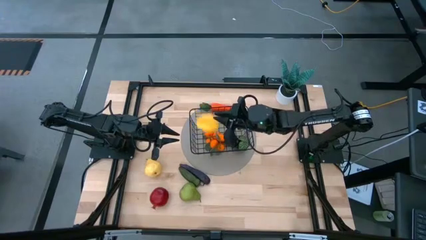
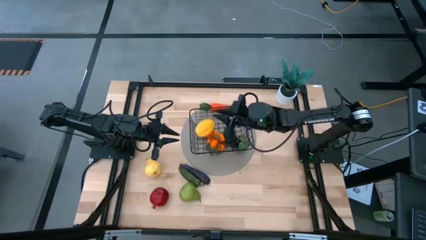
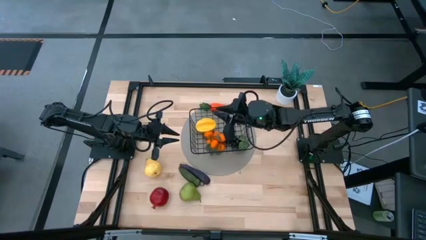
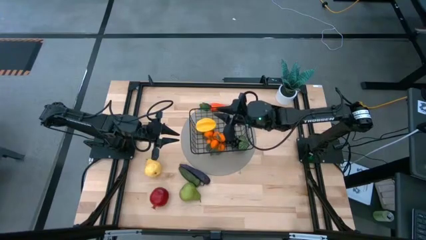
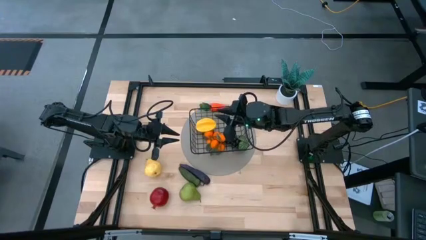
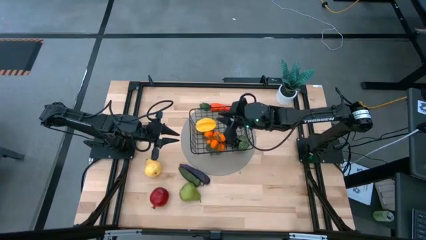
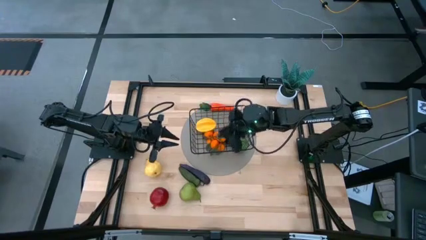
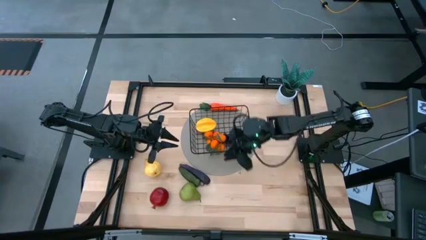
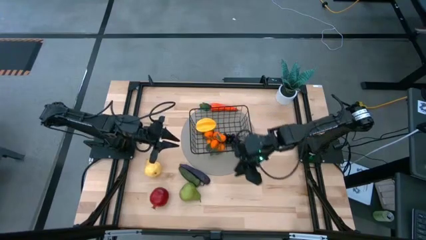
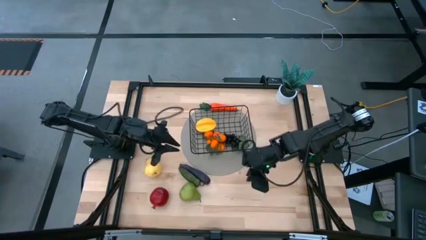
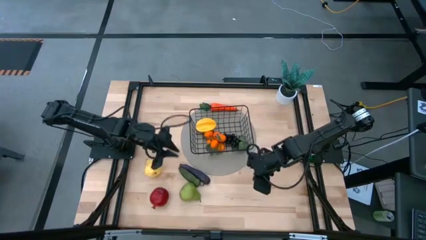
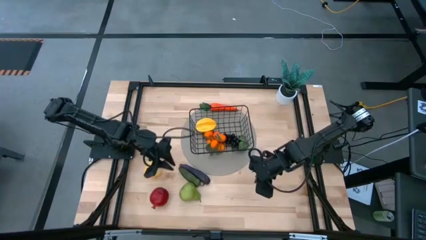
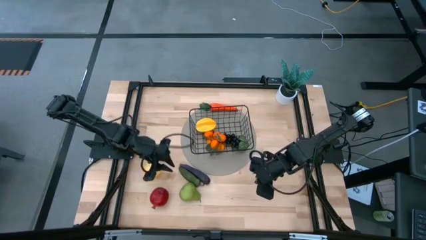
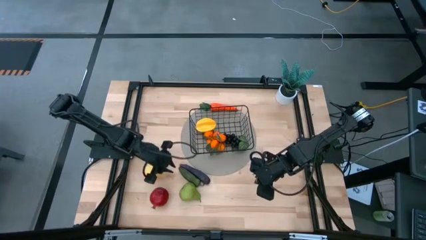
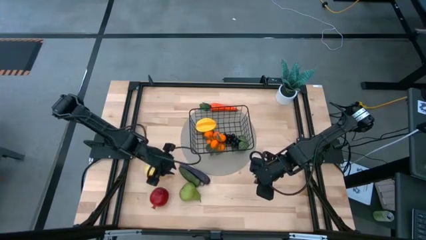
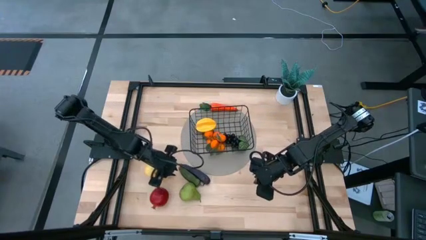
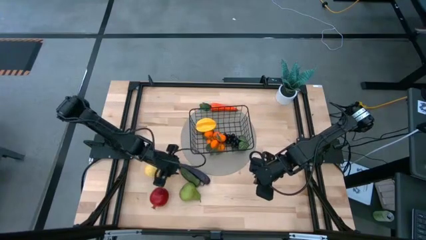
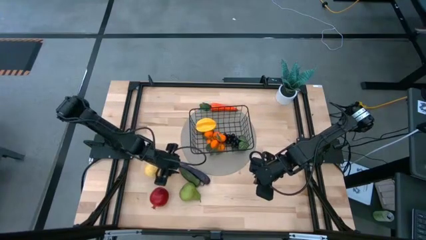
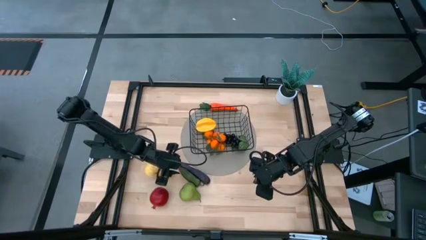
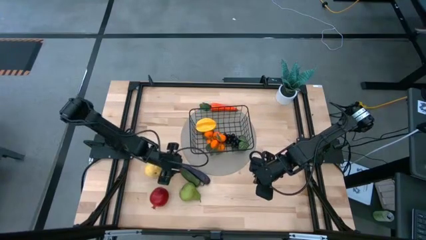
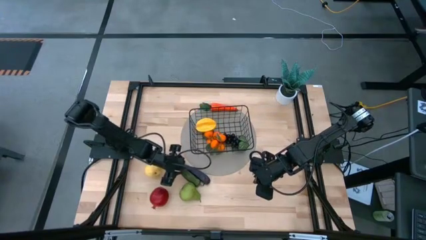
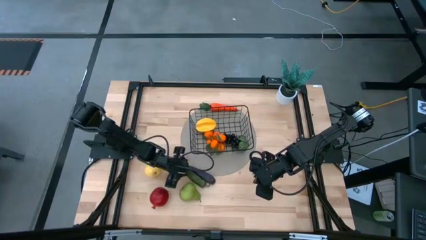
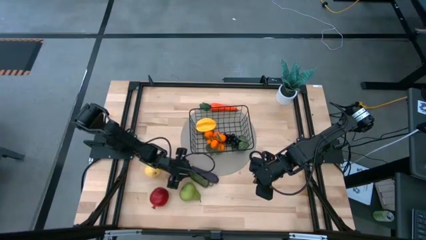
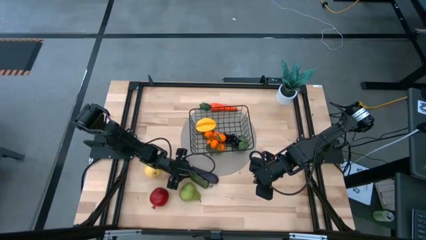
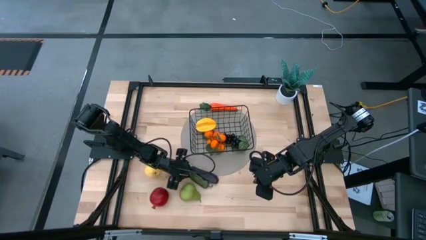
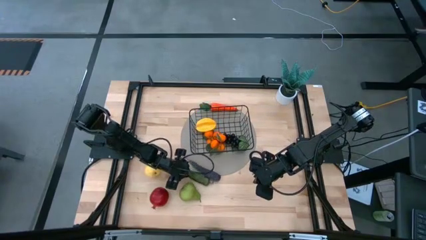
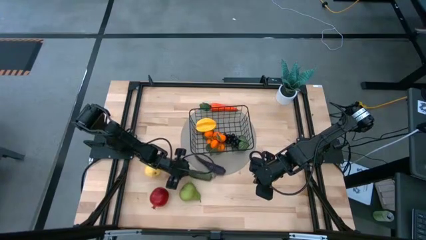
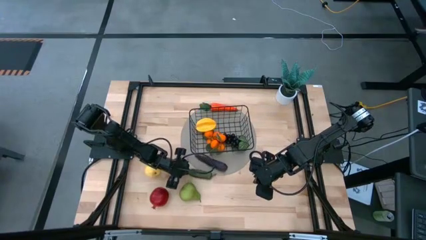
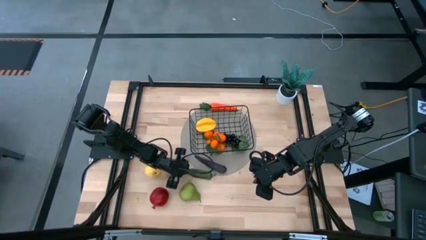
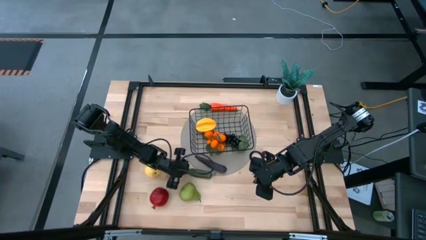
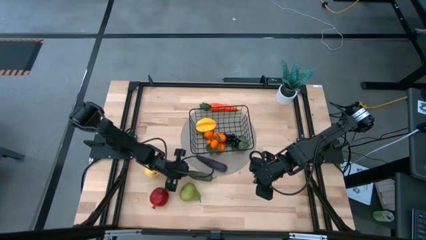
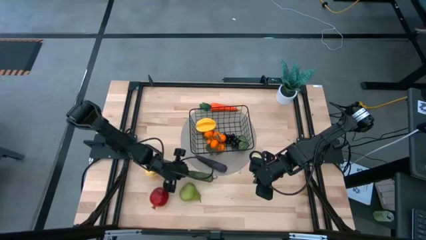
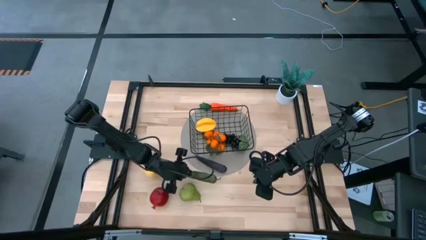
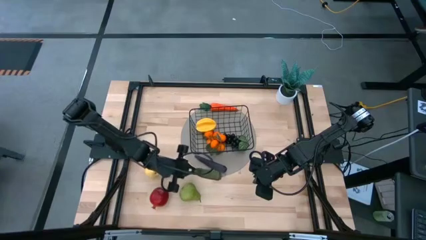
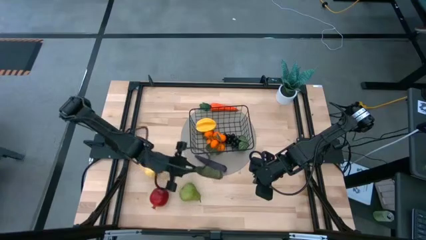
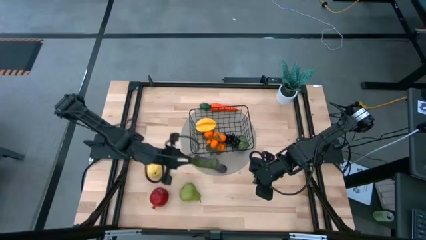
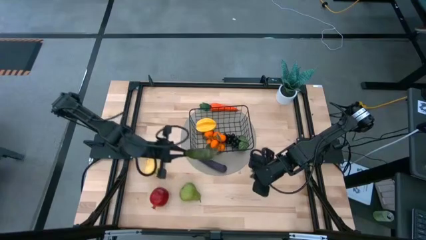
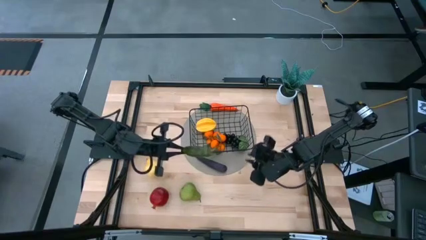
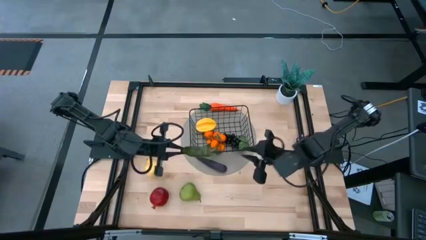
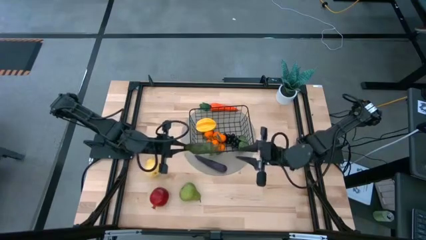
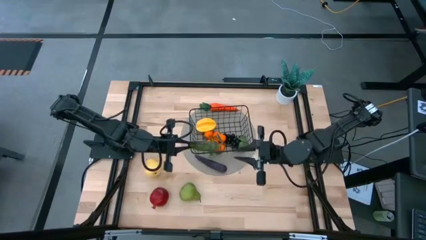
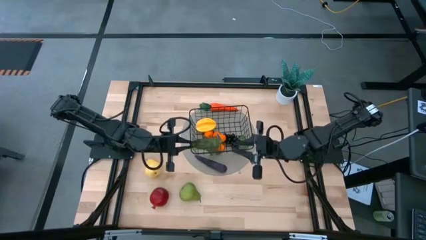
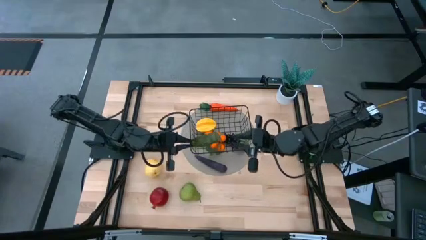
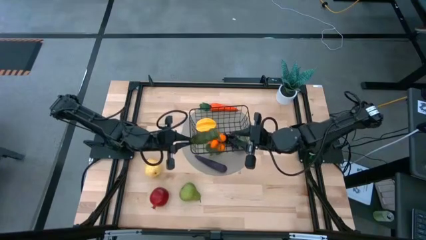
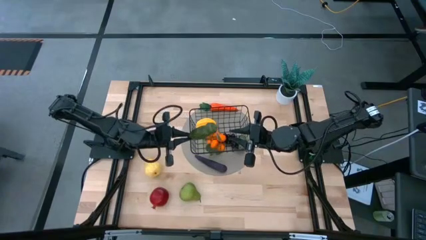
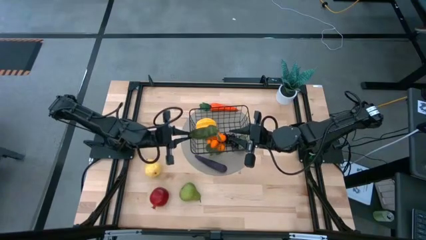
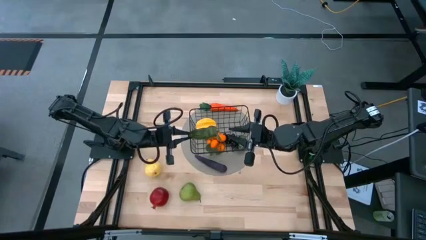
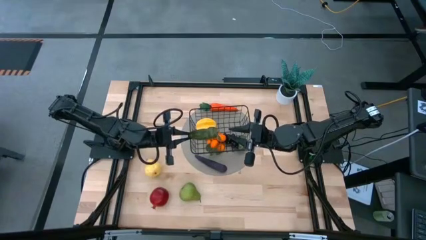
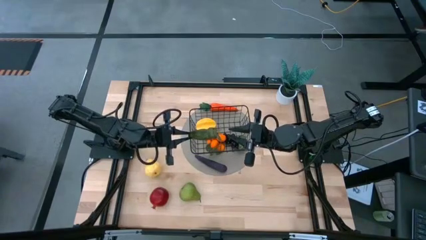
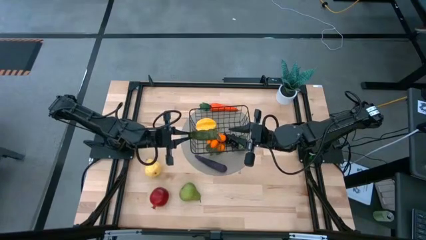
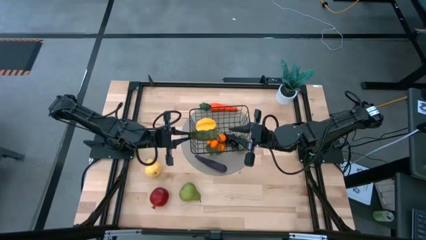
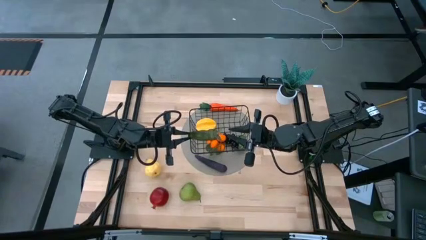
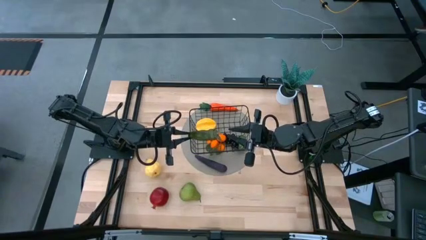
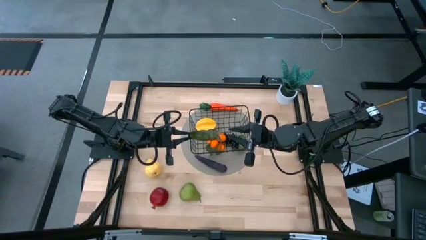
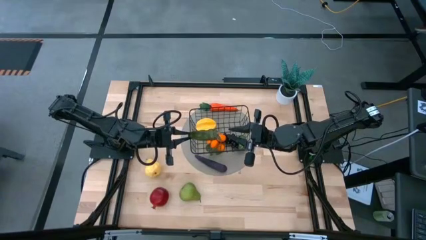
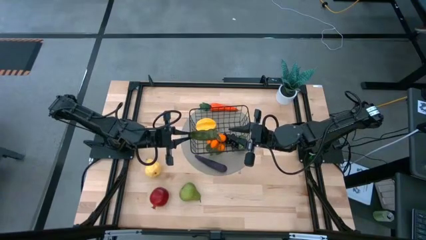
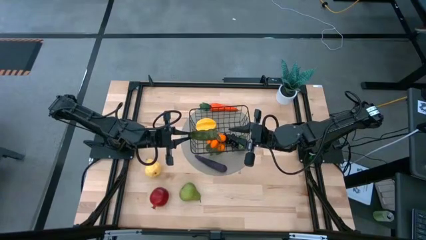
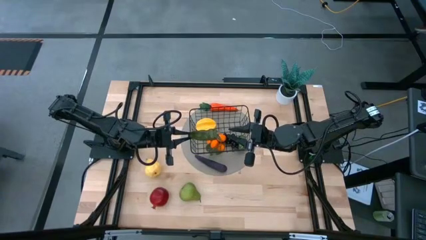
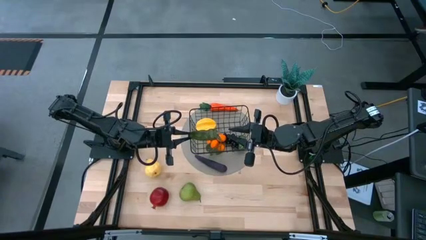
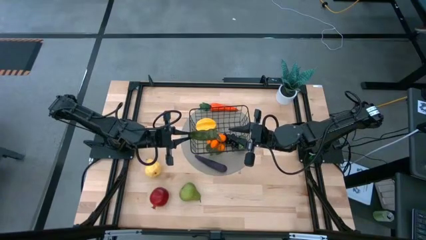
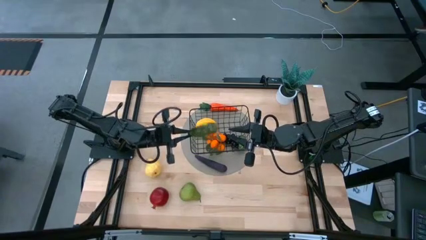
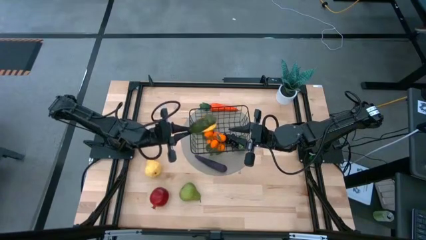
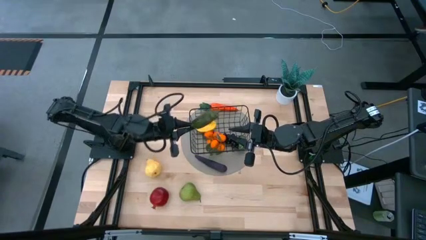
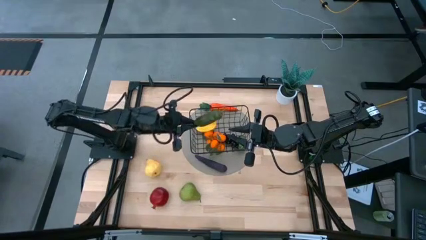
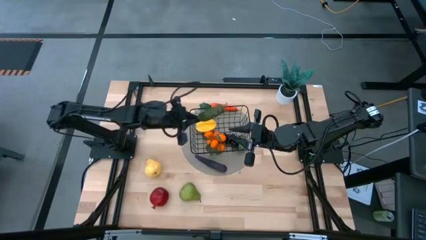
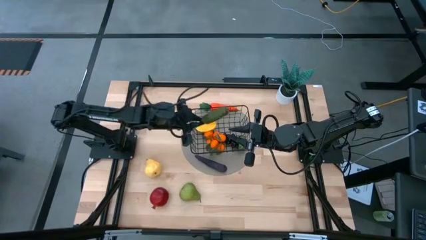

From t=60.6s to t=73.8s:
Task: Build produce basket
Put the green chili pepper in the mesh basket

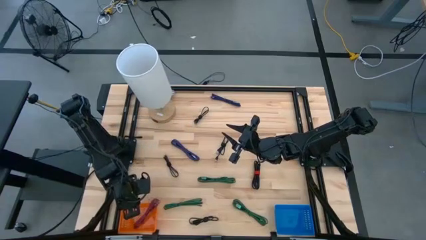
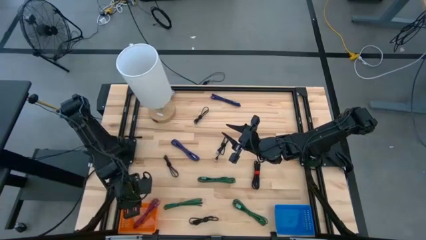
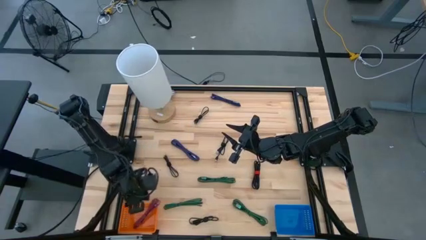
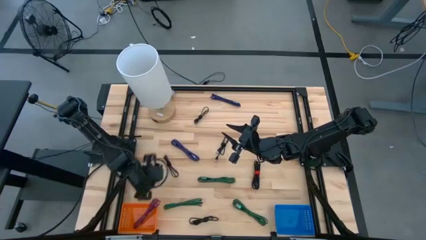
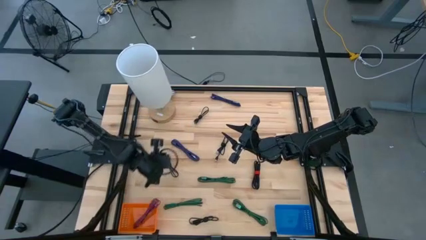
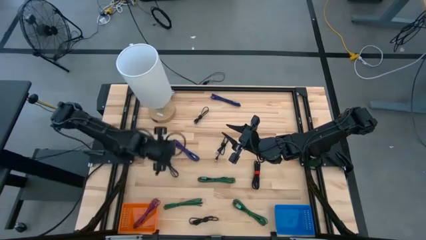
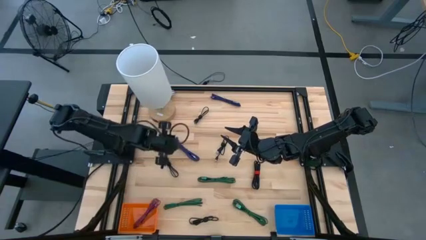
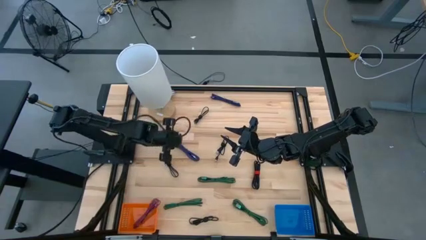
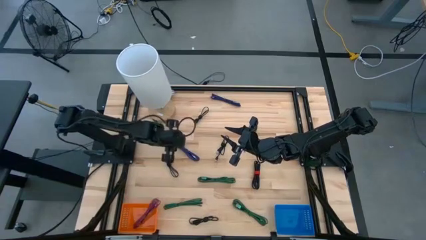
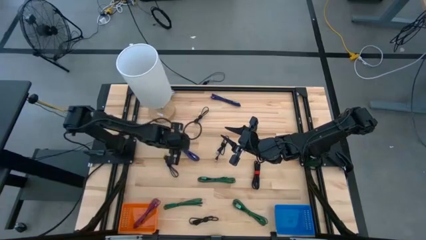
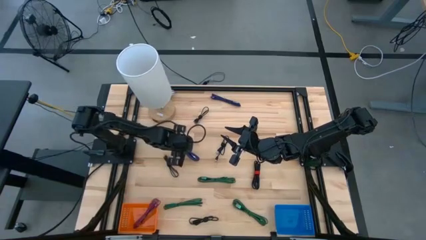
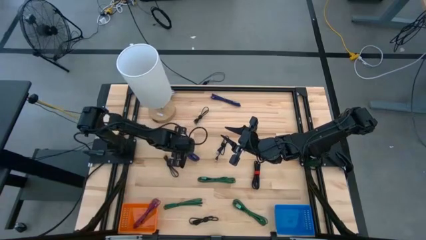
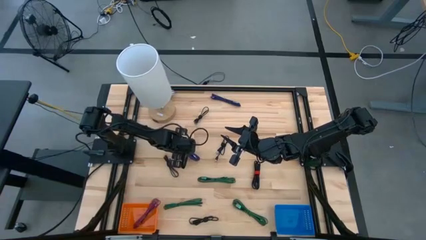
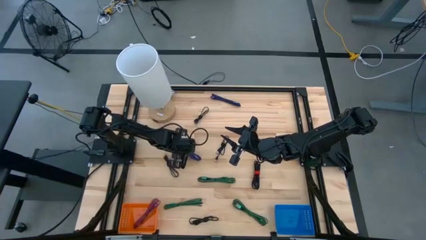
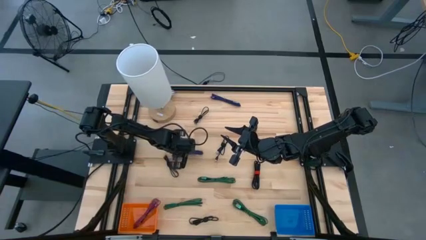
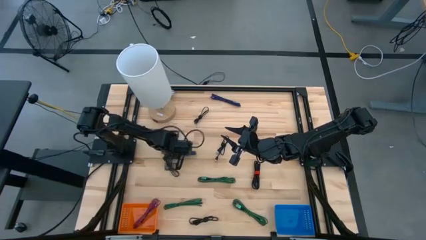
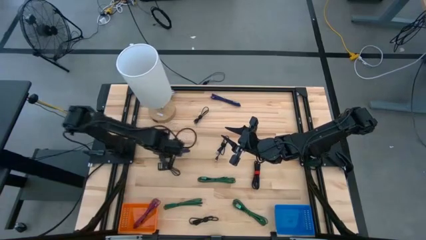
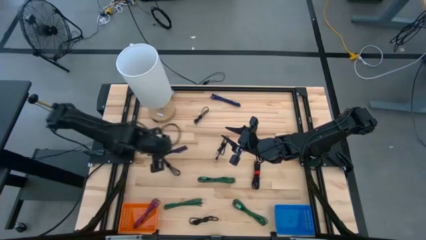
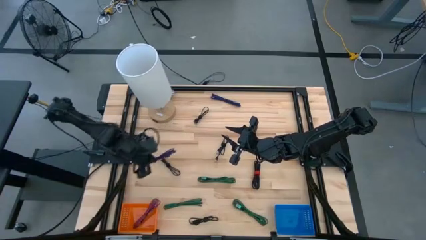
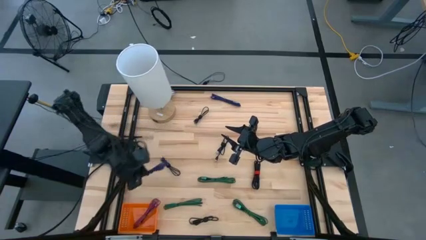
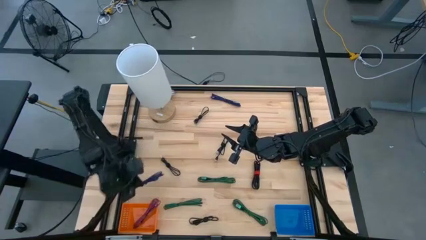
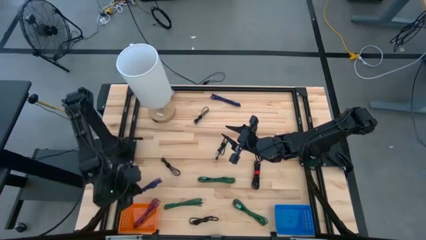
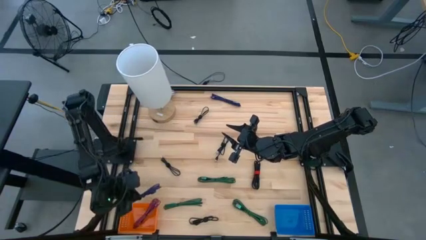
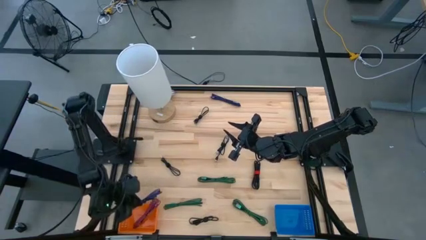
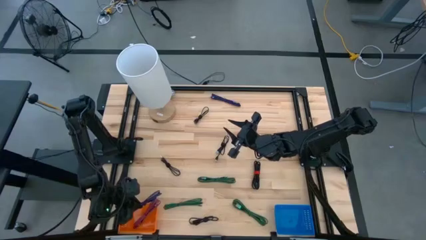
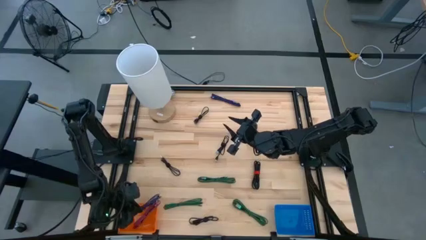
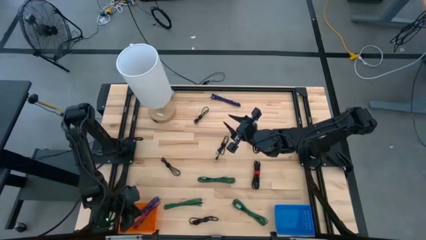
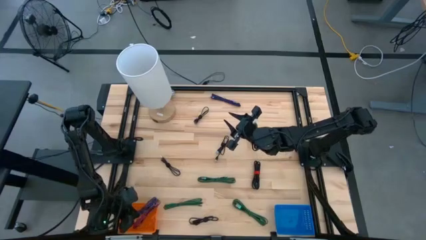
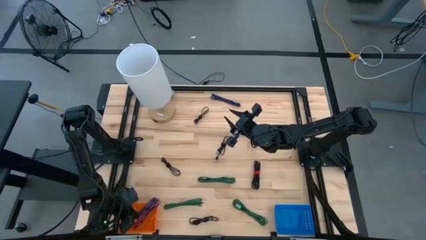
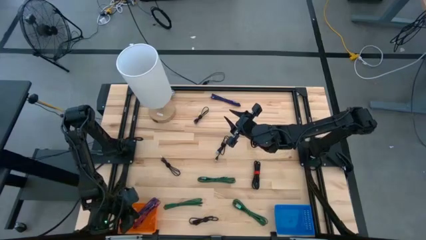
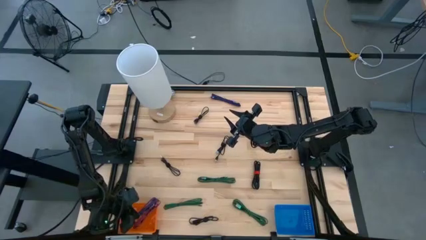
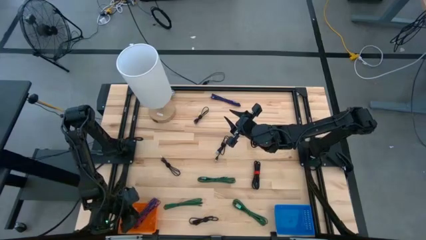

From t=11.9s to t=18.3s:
Task: Pick & Place USB Port
Put the bottom blue patterned charger cable into the orange bin
